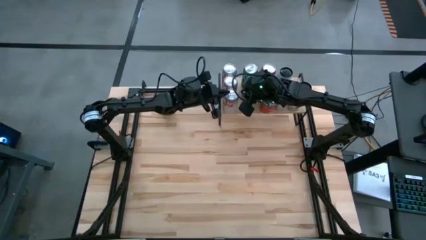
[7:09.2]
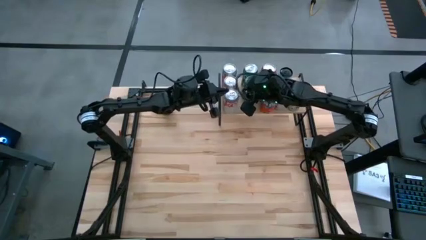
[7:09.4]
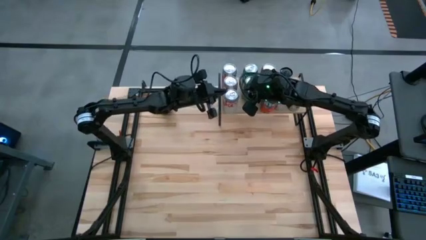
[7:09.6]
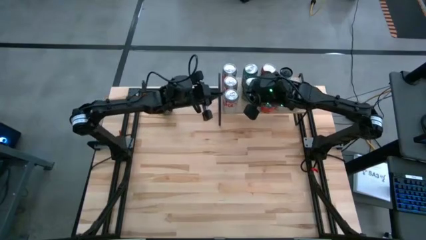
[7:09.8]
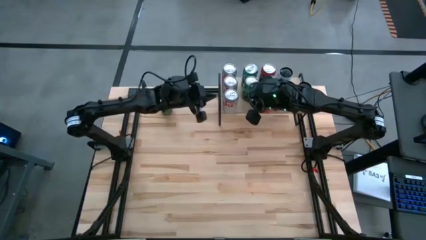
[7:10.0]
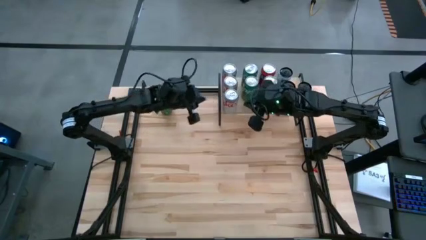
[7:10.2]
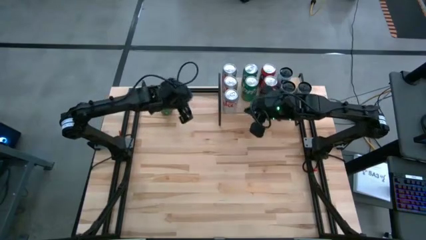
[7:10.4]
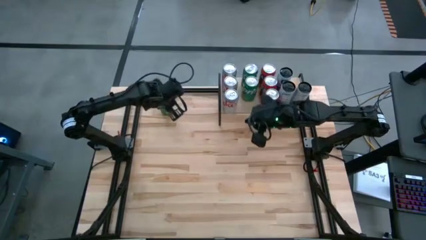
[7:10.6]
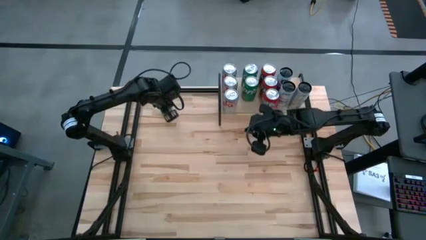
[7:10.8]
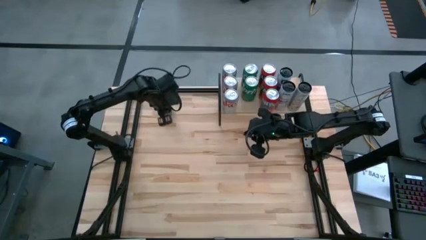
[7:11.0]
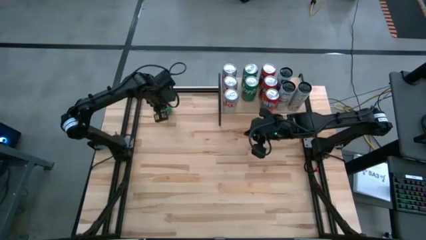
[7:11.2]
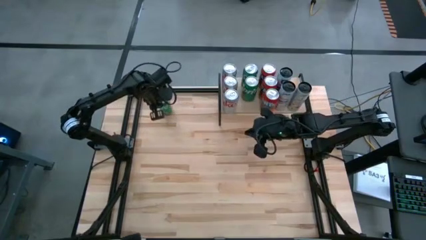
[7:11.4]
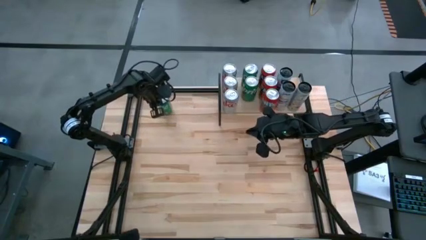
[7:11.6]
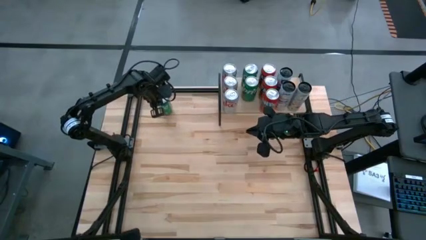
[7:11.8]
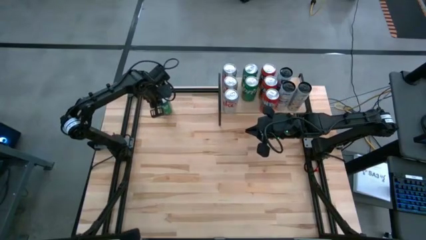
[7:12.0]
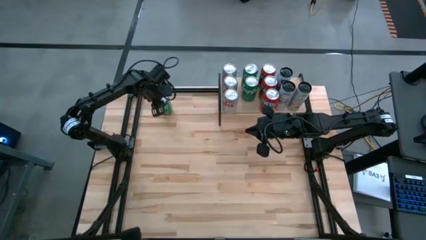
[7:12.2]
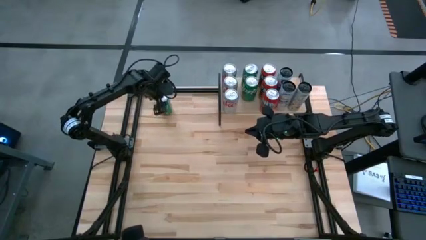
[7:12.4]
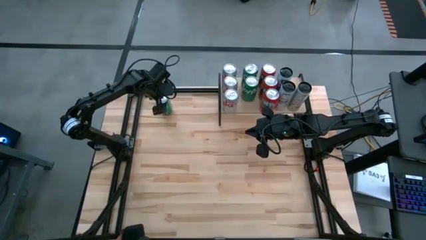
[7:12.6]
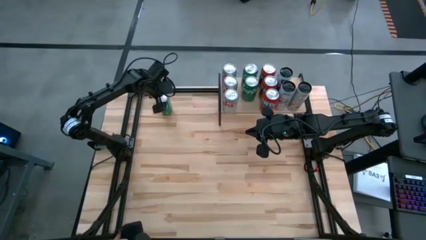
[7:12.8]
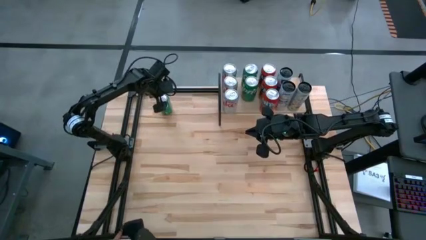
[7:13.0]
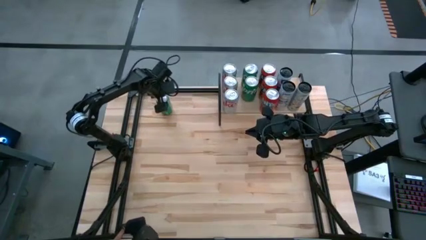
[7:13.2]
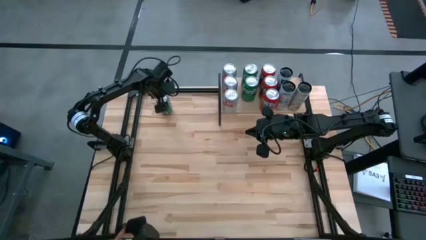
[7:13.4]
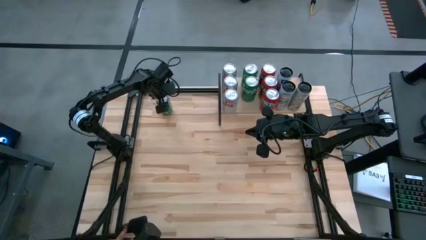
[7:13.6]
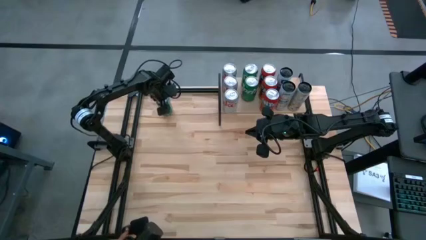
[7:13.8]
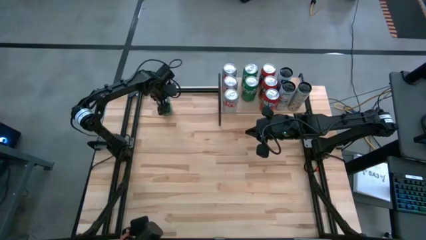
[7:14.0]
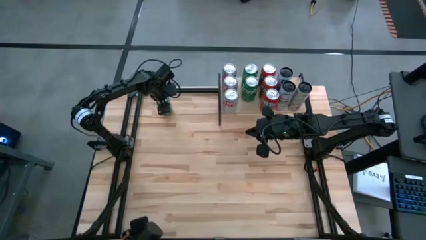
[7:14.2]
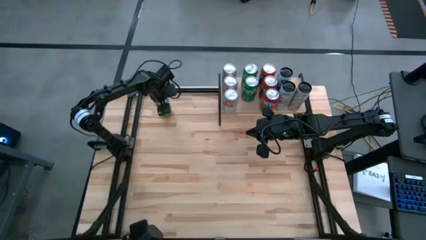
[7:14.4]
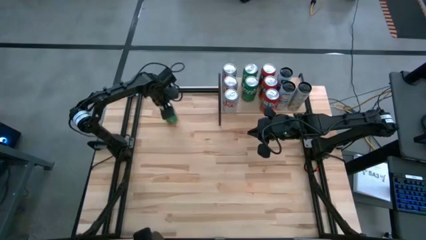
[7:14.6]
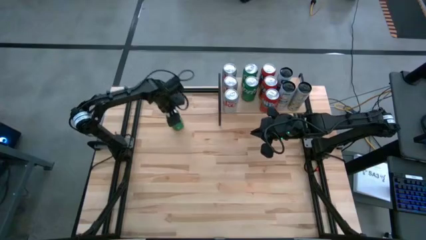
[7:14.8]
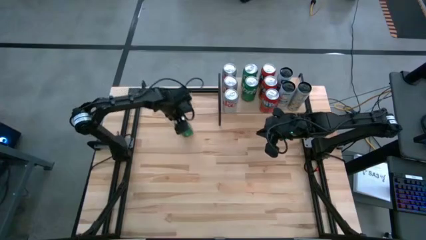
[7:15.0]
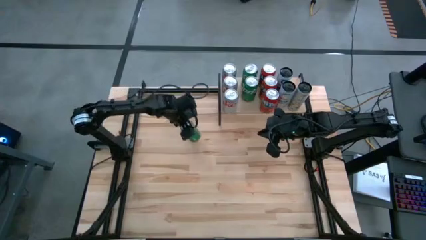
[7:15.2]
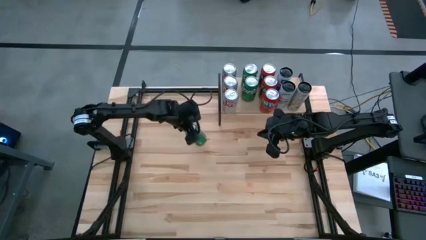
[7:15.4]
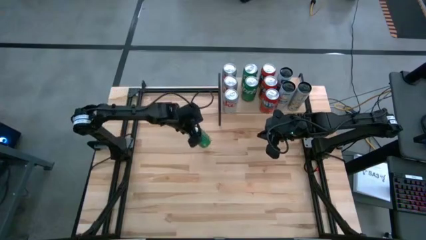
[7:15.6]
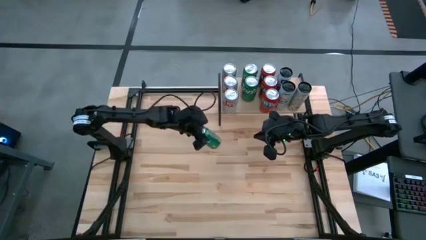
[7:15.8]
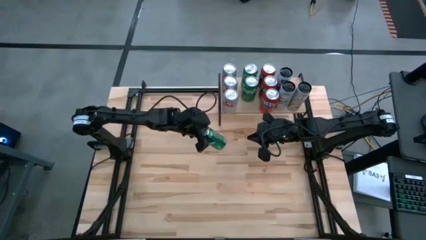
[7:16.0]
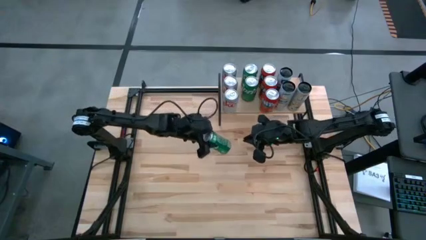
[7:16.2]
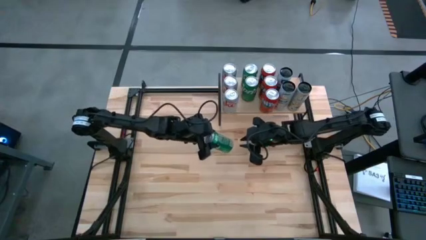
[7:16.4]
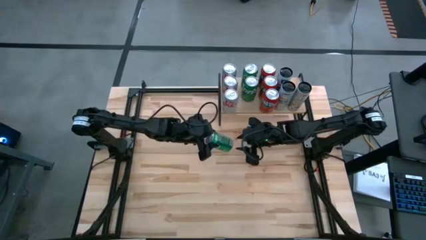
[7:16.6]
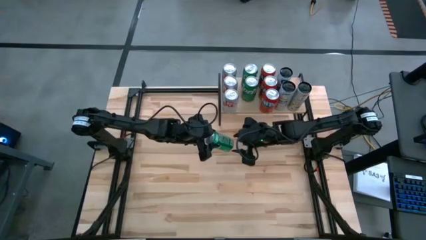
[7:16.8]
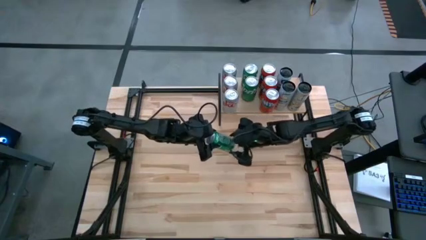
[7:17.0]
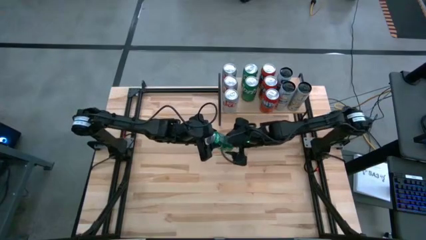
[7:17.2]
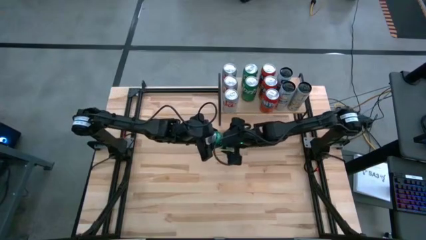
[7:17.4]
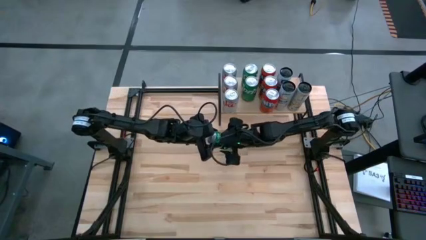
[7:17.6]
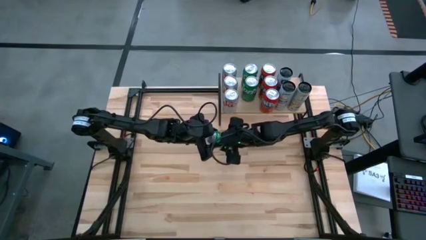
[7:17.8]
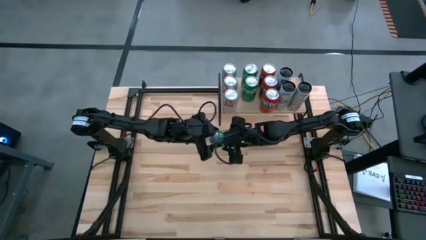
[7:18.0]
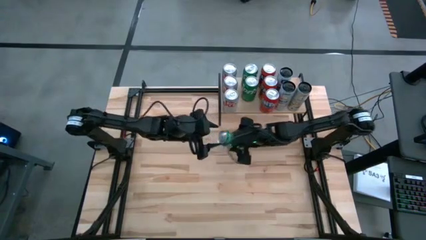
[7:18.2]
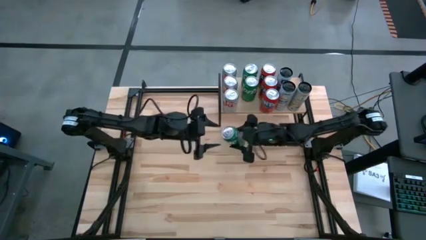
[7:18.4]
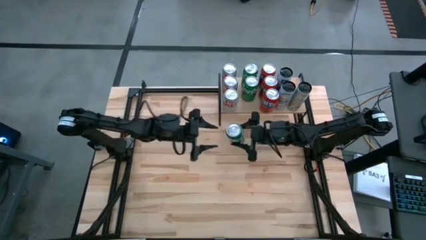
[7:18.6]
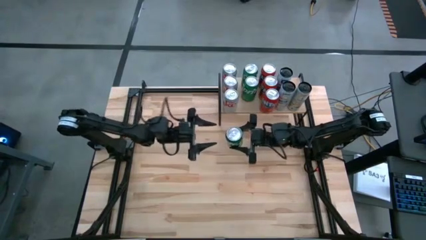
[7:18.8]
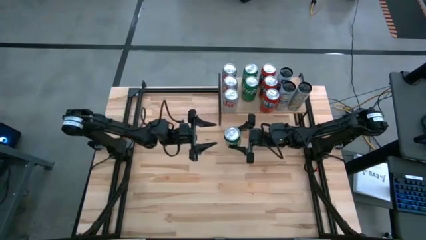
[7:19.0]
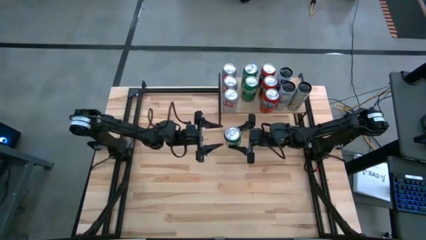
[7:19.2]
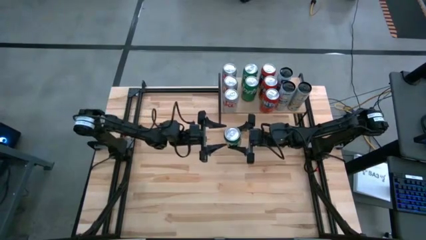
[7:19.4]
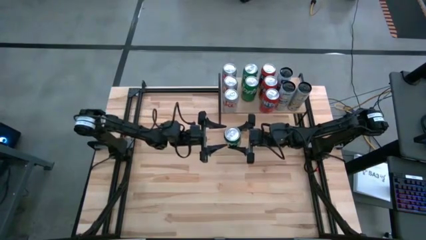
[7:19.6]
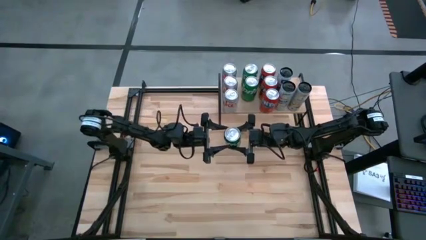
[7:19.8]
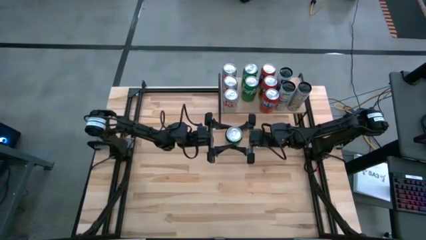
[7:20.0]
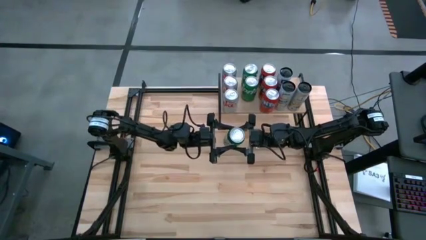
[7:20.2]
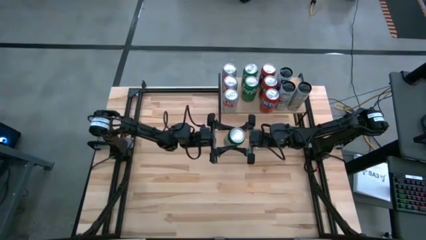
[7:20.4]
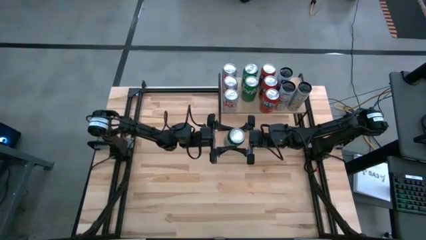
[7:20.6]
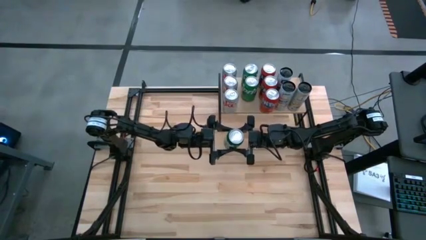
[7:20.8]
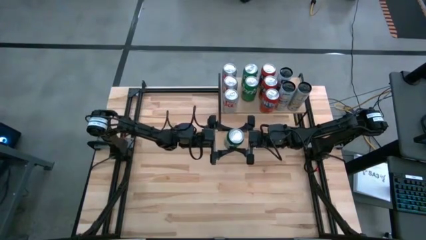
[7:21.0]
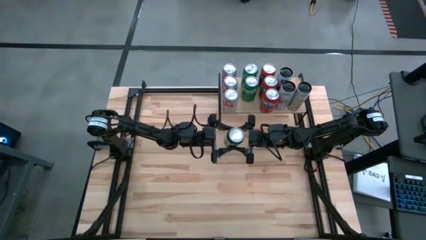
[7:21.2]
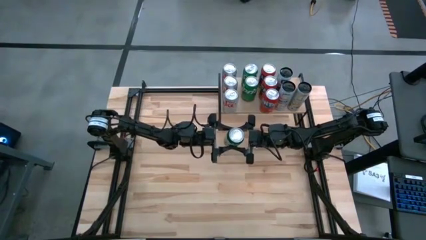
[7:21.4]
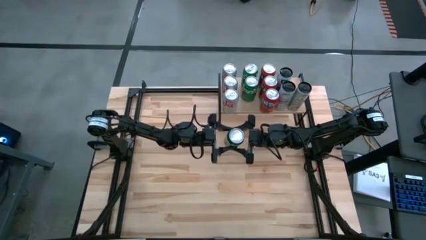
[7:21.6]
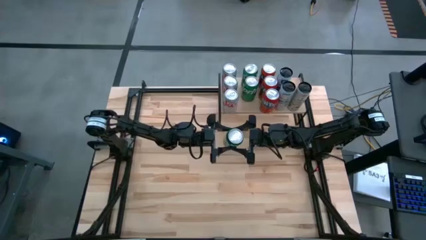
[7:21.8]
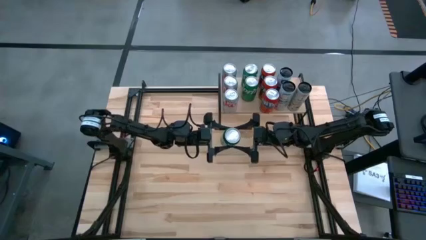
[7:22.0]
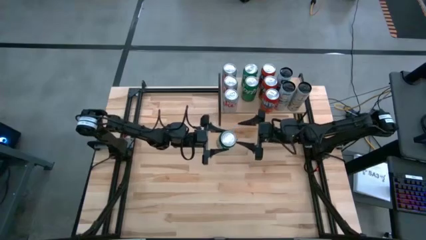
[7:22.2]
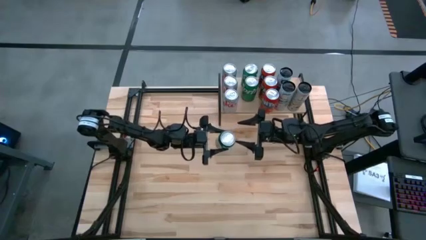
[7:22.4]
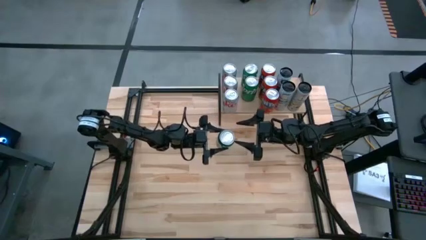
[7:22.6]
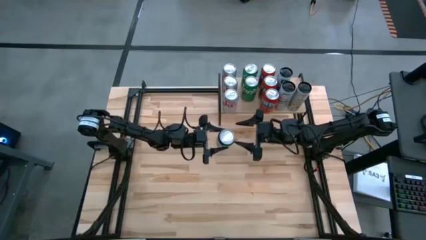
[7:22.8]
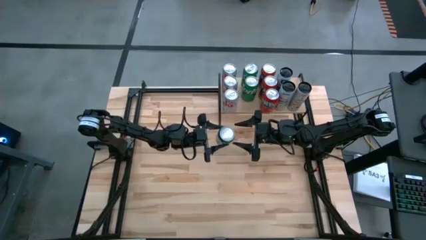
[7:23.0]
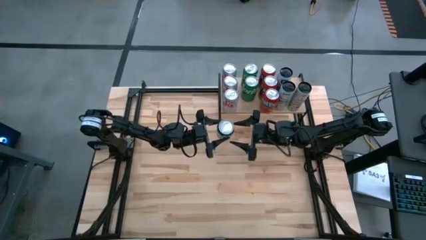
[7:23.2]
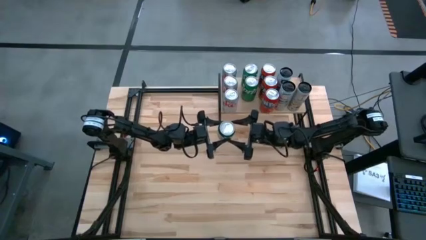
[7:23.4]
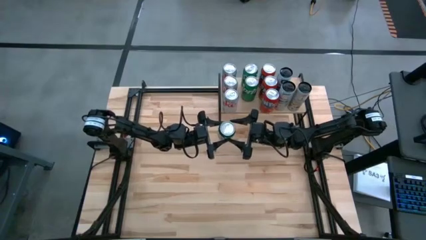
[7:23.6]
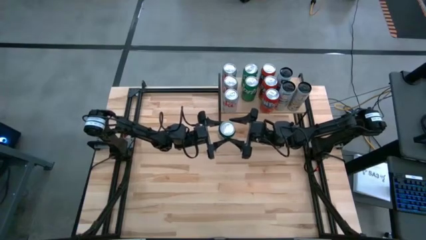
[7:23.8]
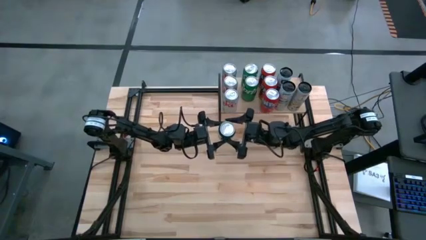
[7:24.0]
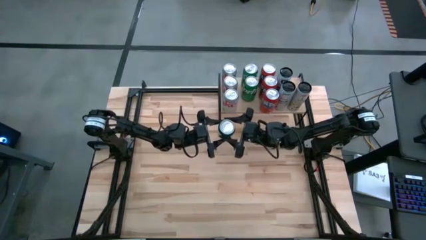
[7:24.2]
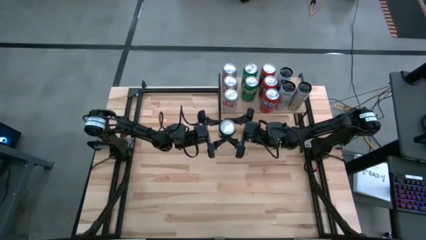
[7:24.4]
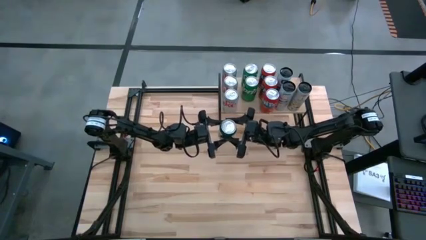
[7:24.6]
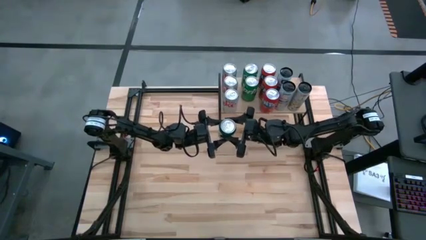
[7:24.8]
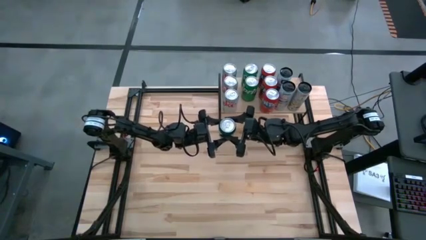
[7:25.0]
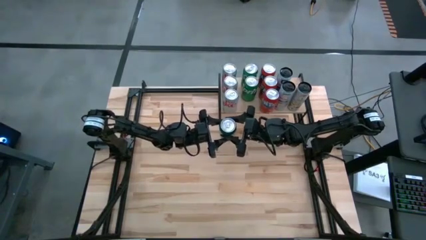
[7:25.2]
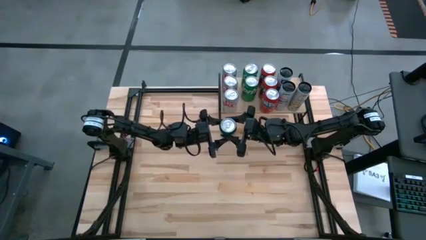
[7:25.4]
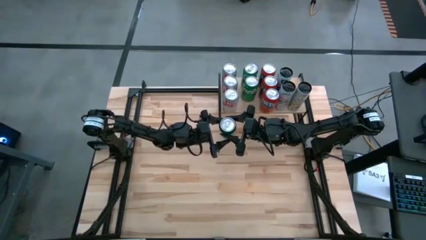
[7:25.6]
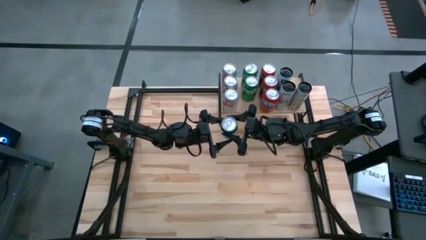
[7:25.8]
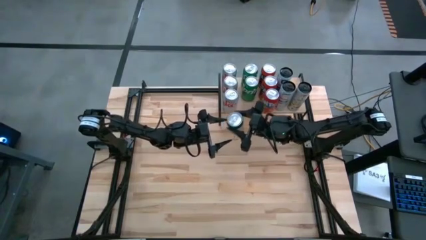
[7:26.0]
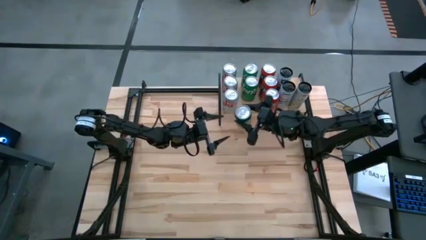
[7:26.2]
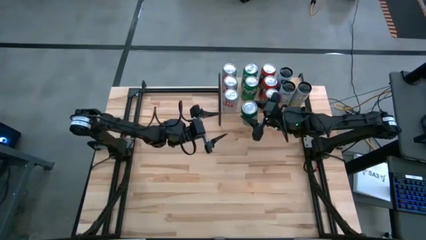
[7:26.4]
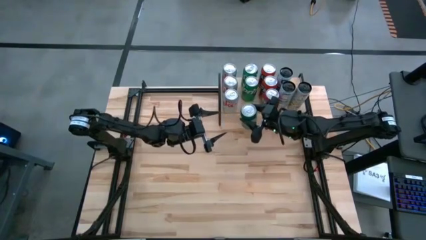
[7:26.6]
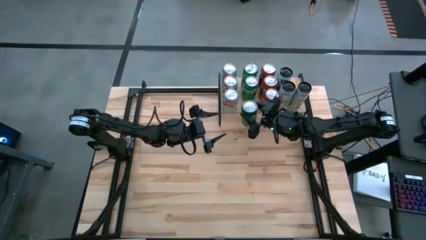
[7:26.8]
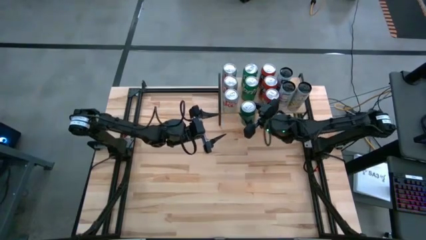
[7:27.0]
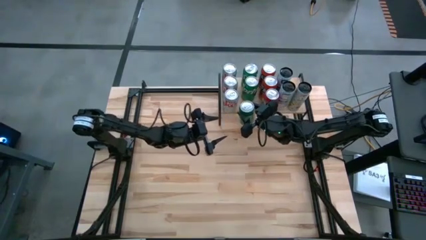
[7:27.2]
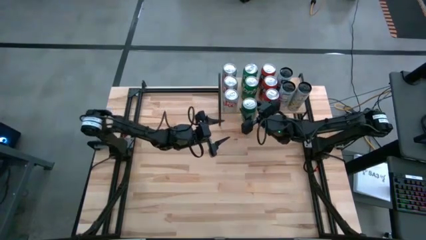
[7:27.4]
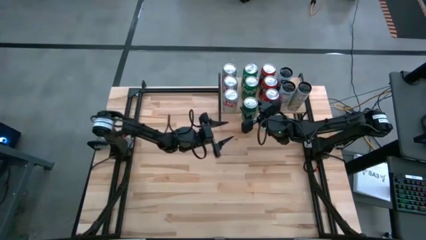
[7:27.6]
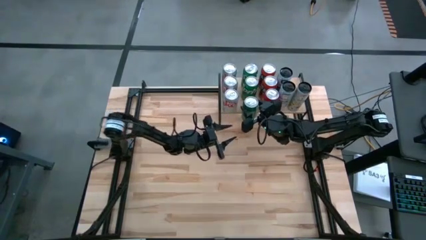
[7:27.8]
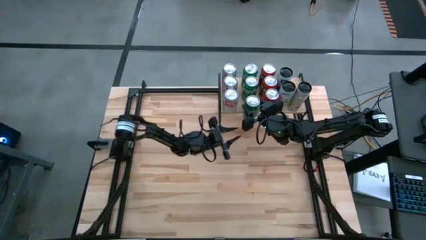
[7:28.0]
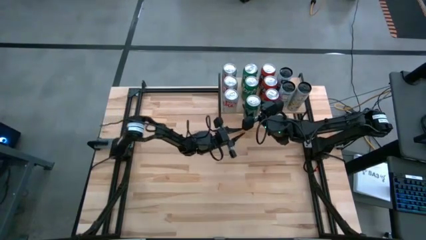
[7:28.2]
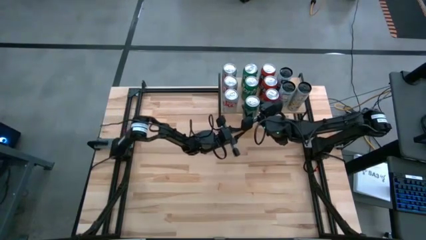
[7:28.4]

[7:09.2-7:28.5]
Task: Place canned beverage on shelf
Put the green soda can on the shelf aligned in front of the other green soda can
